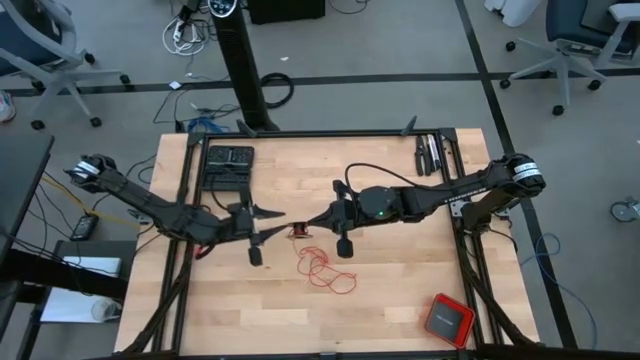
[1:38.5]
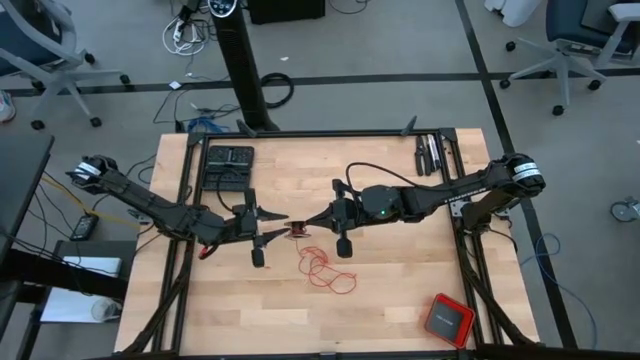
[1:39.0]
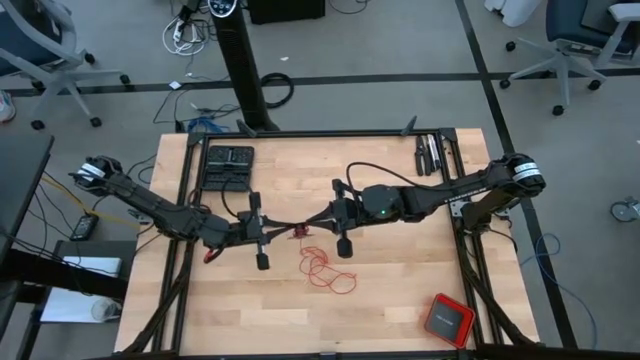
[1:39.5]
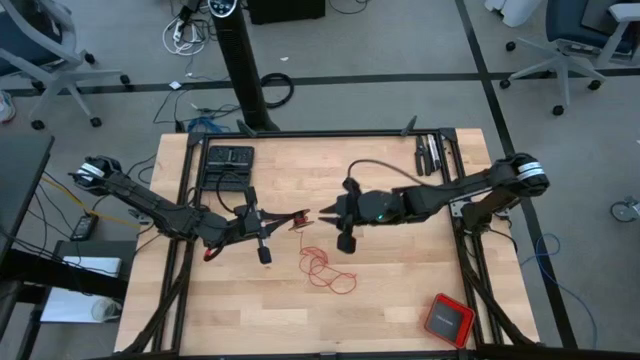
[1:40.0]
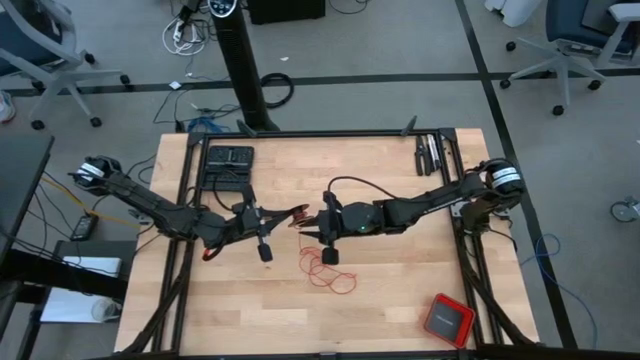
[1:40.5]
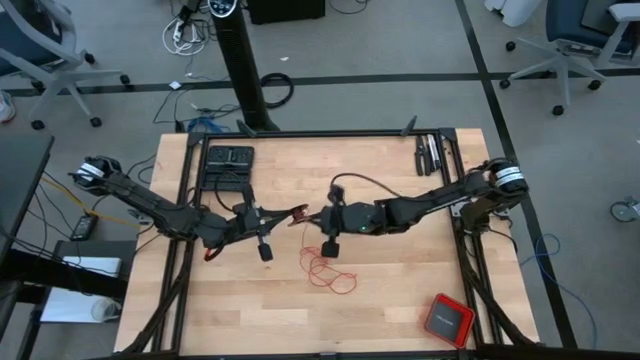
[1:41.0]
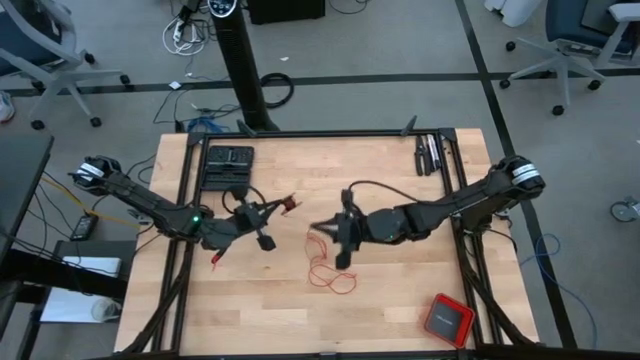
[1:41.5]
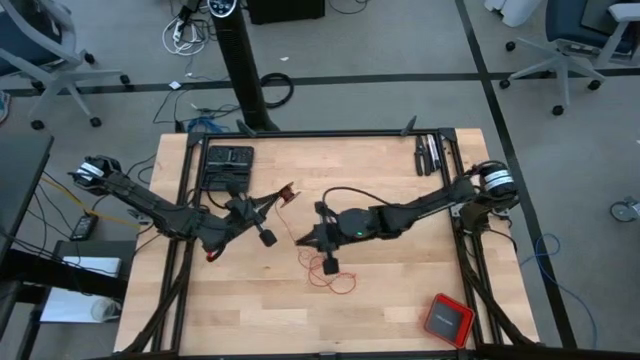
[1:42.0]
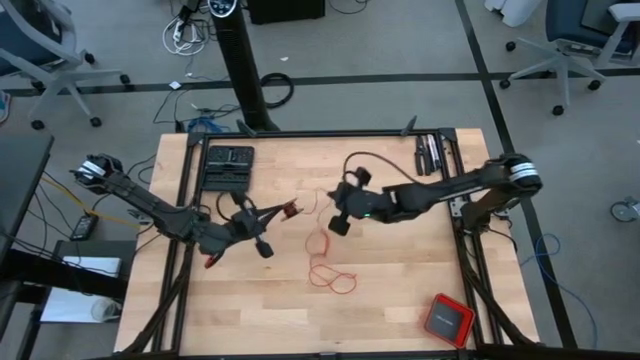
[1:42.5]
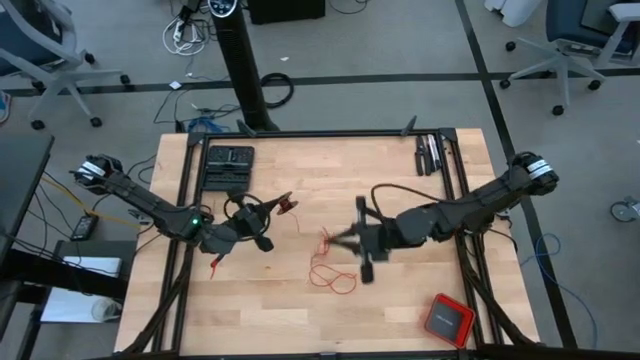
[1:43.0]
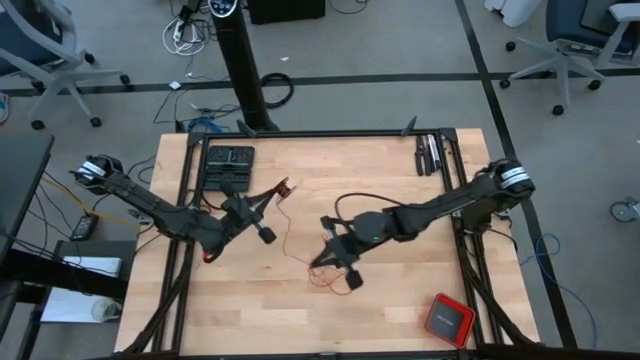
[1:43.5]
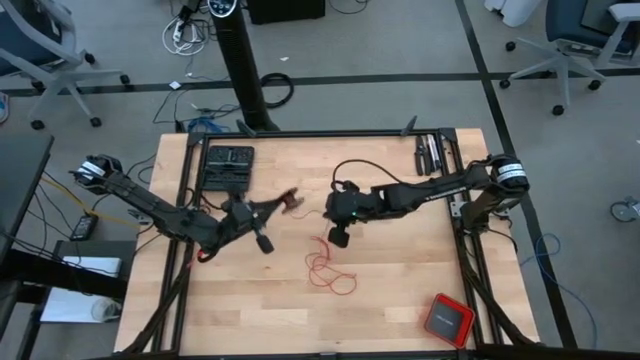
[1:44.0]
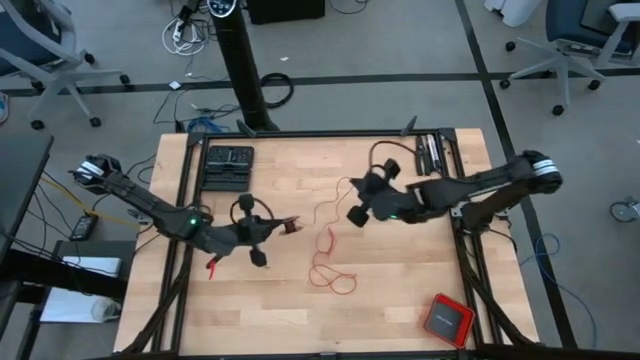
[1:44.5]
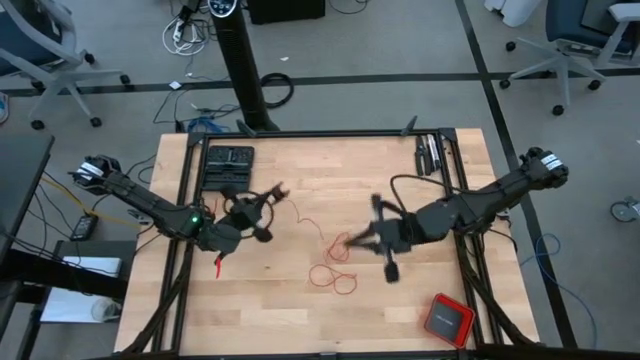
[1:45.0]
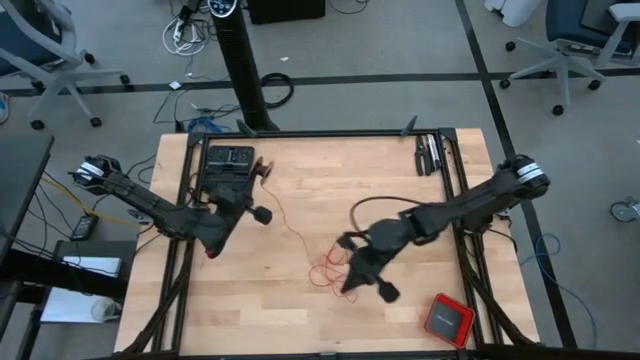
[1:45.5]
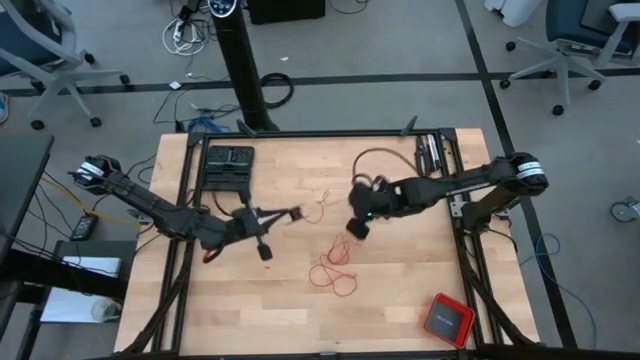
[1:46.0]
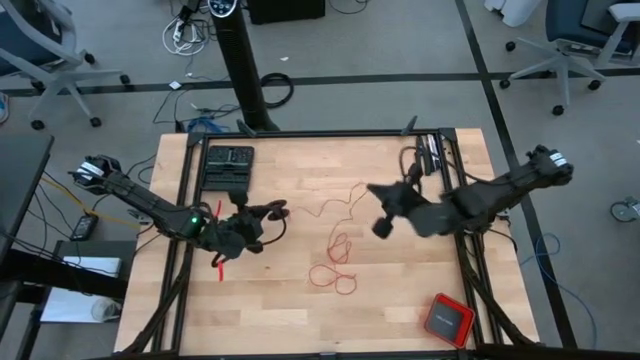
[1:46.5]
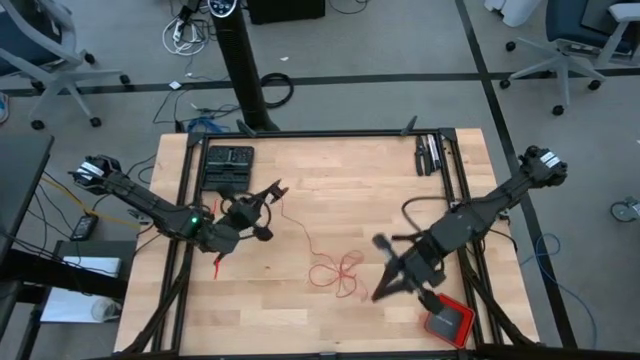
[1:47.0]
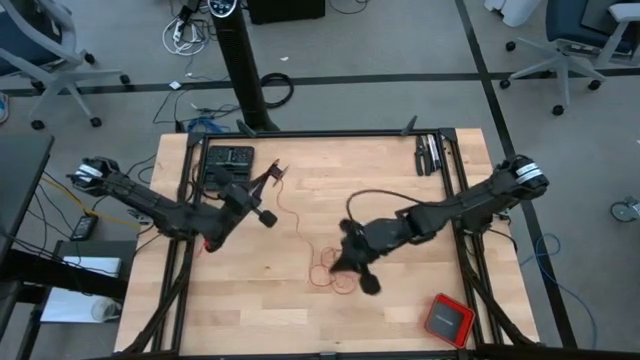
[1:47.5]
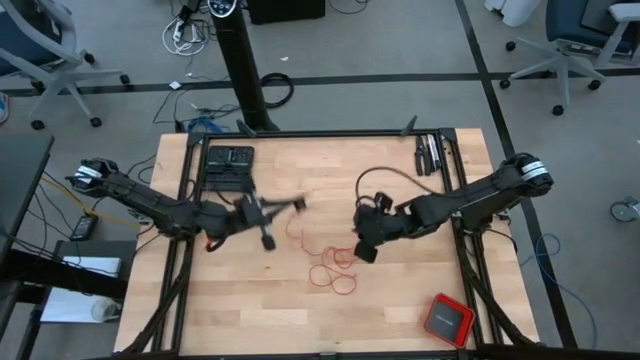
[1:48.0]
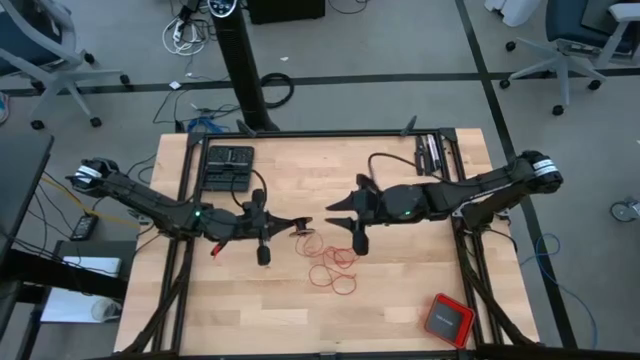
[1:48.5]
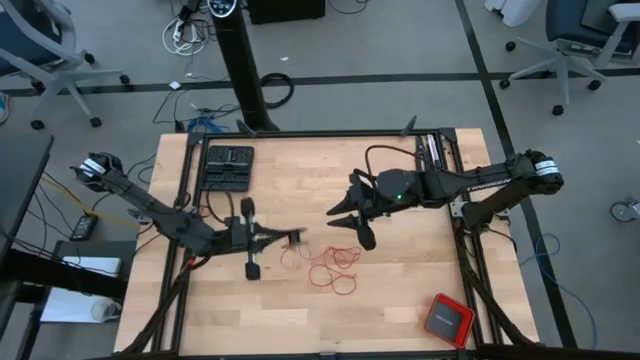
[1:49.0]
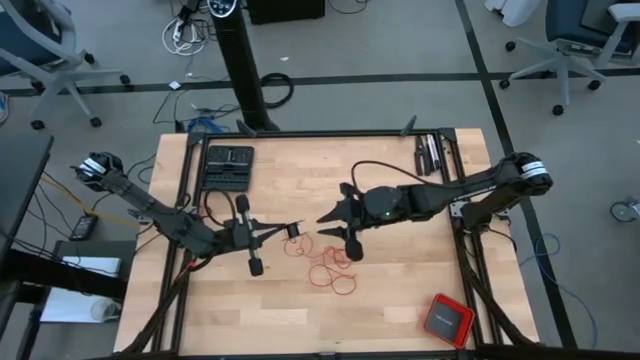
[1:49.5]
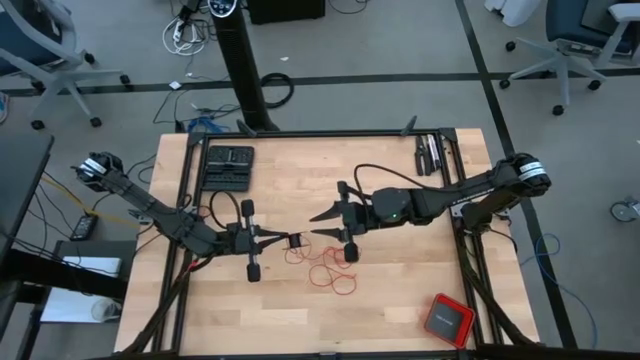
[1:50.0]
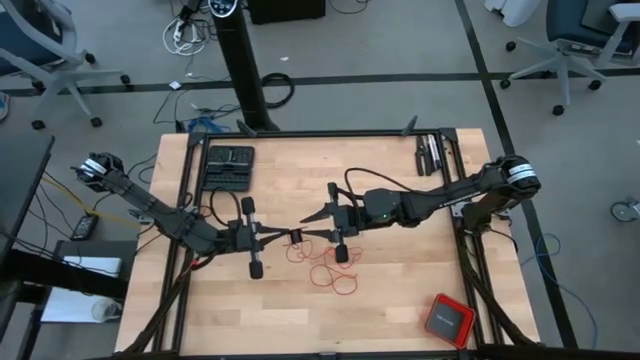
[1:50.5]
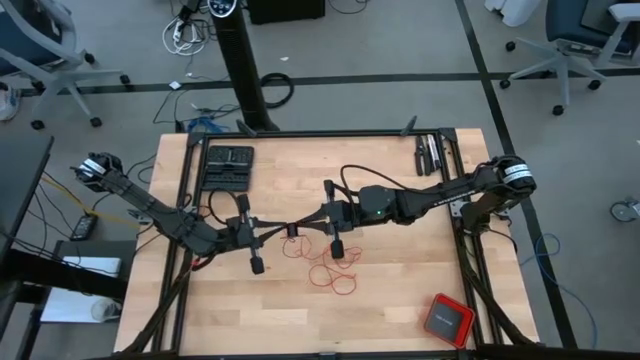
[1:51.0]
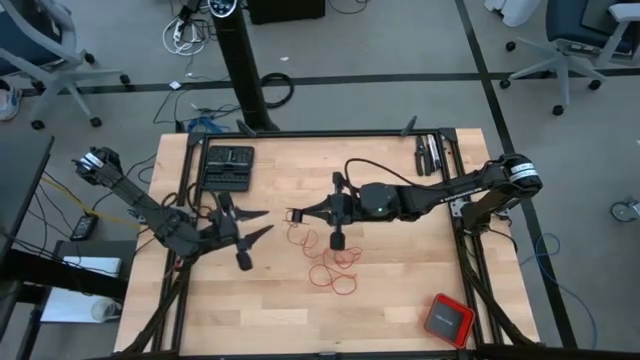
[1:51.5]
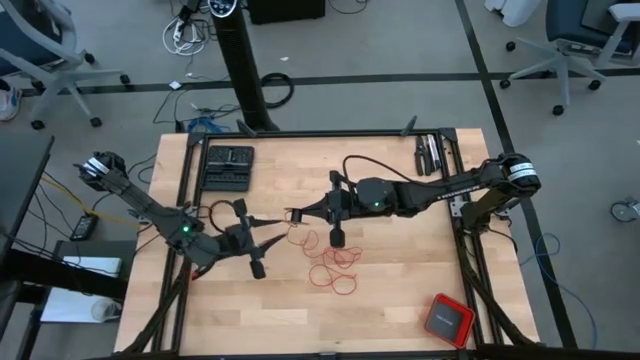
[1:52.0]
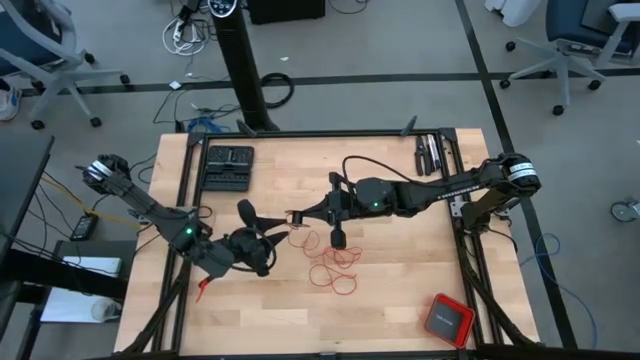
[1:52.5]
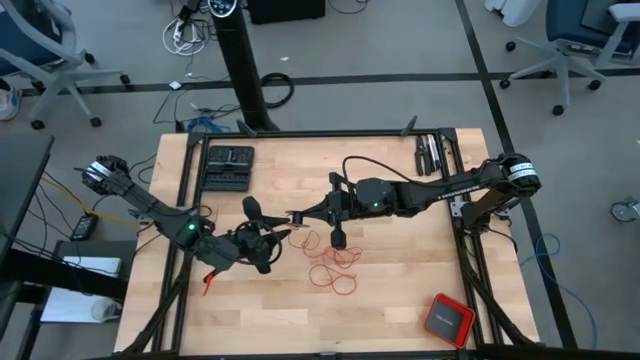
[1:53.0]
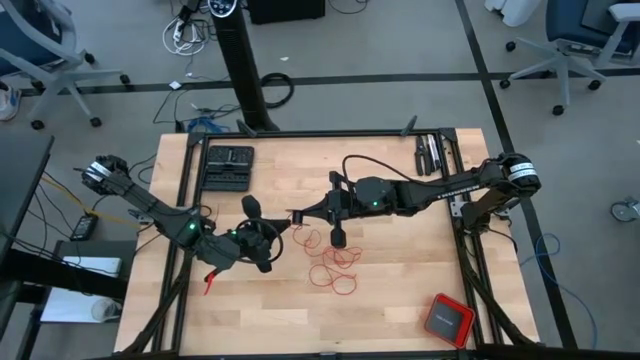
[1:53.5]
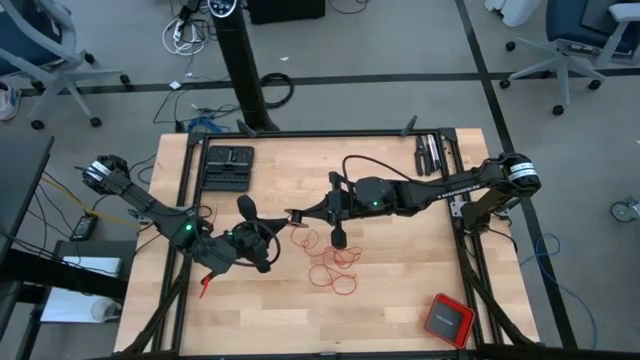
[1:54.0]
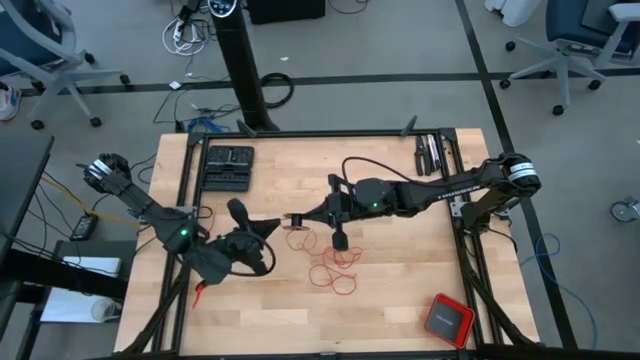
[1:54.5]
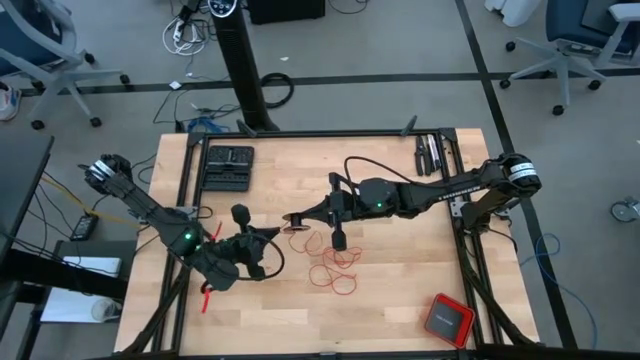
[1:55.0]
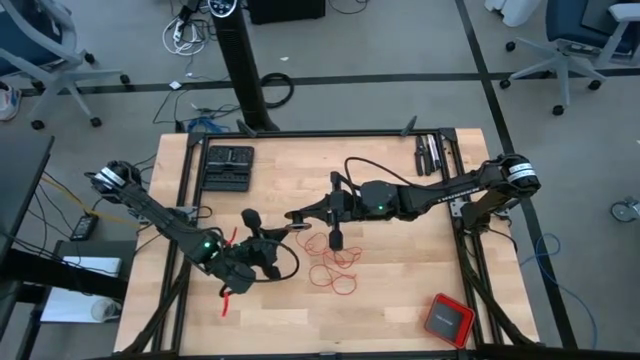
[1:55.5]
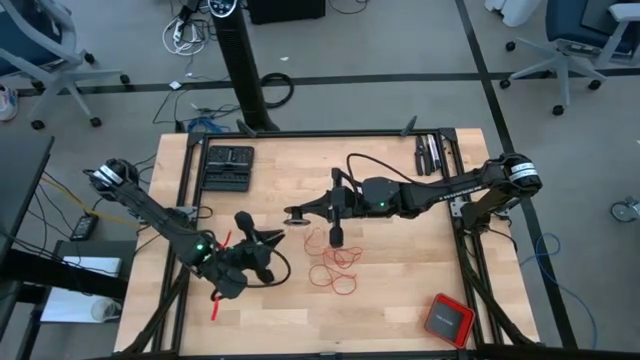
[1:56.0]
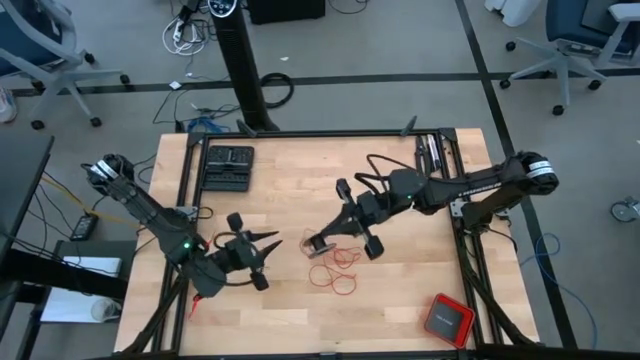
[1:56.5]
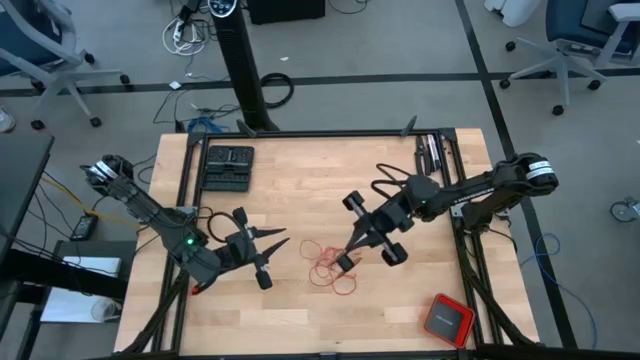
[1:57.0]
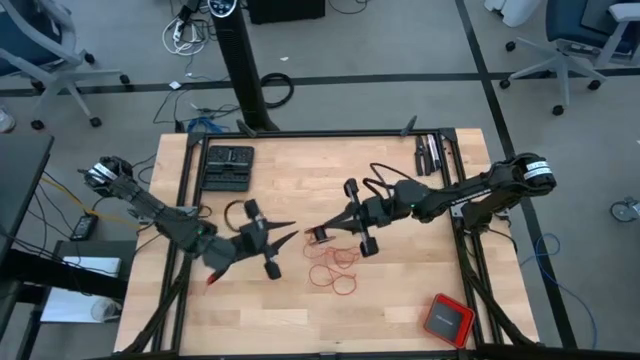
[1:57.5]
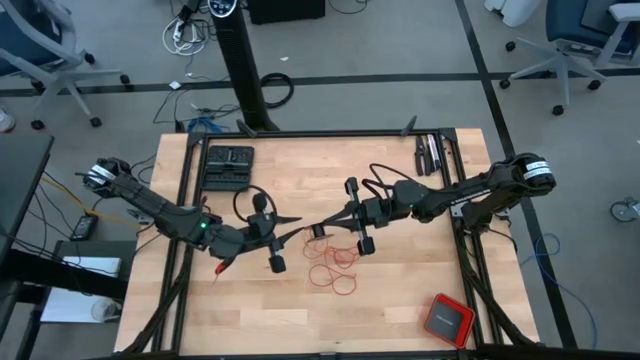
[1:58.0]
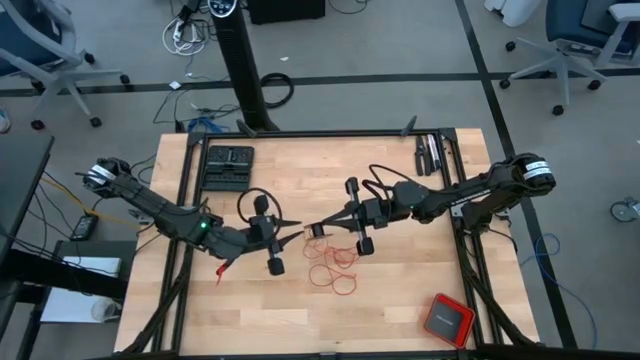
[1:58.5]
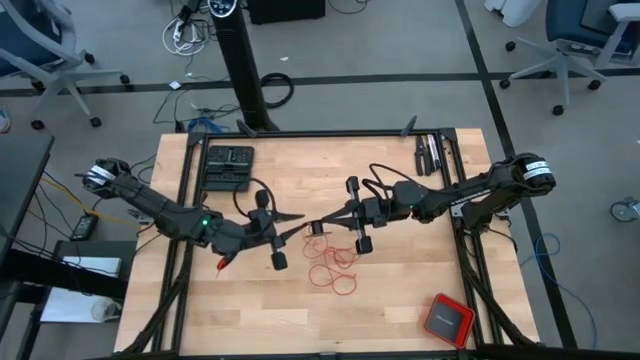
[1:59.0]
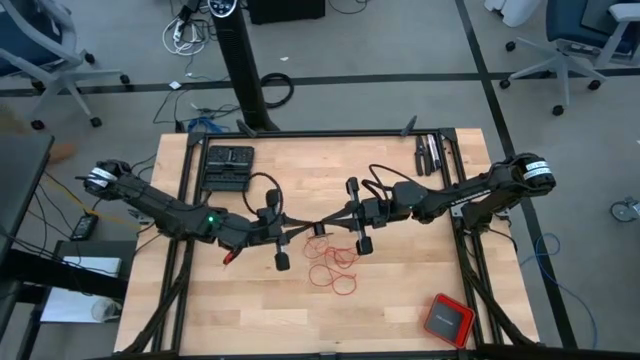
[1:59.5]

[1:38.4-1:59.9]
Task: Coil cords
Uncoil the red wire from the spool
